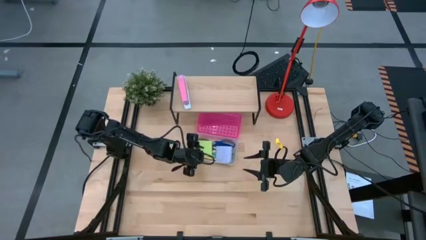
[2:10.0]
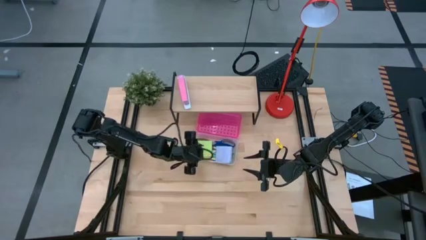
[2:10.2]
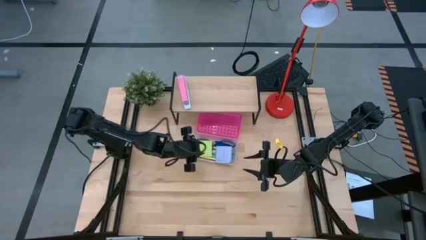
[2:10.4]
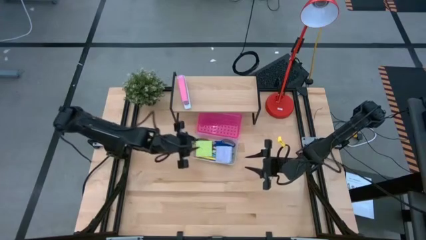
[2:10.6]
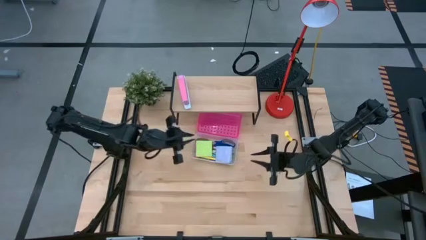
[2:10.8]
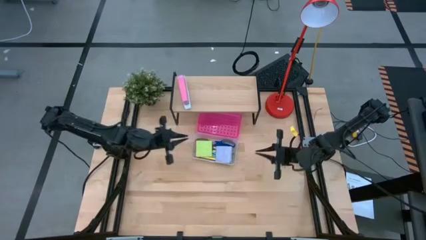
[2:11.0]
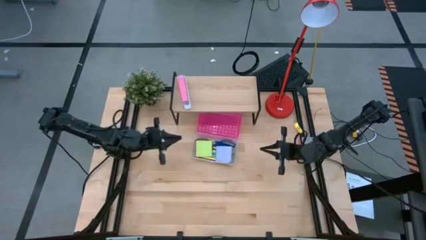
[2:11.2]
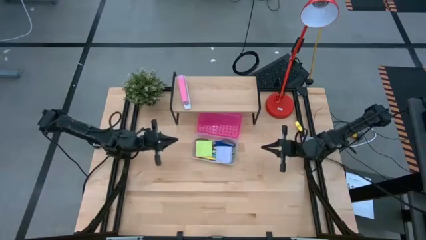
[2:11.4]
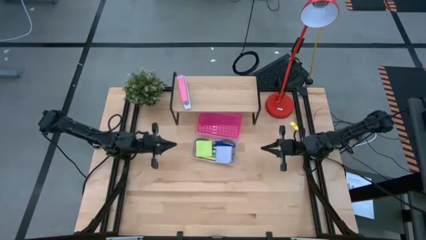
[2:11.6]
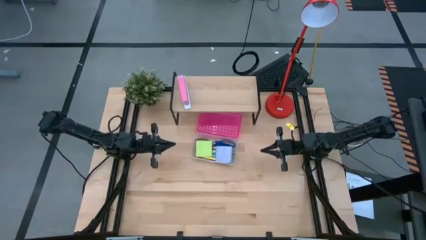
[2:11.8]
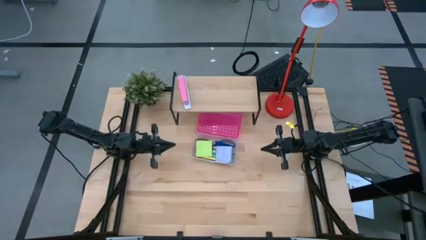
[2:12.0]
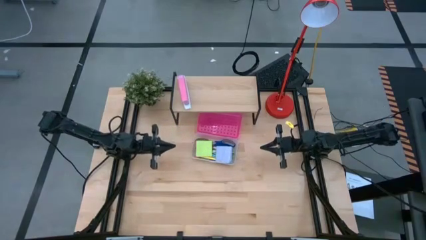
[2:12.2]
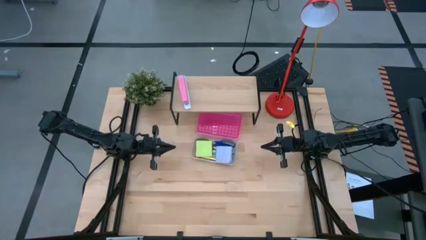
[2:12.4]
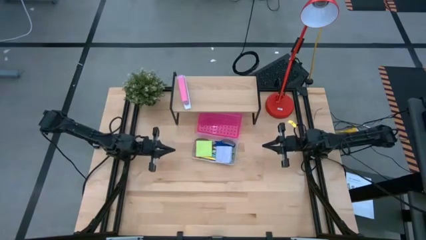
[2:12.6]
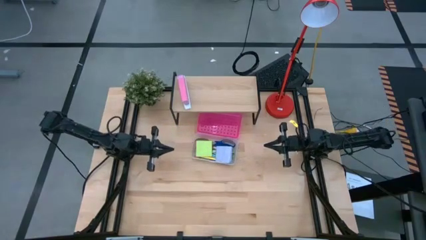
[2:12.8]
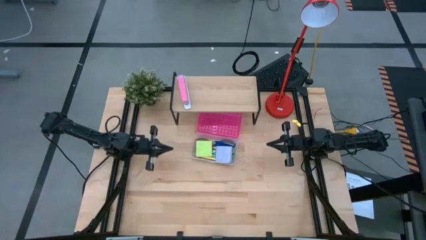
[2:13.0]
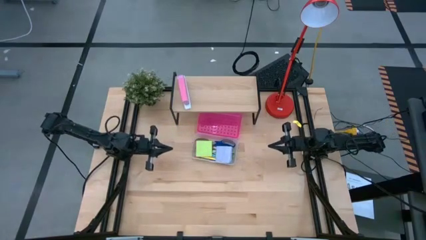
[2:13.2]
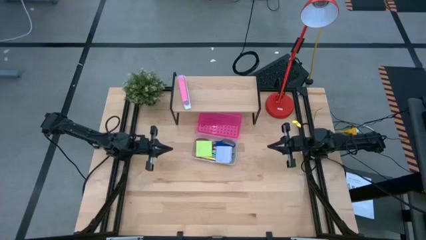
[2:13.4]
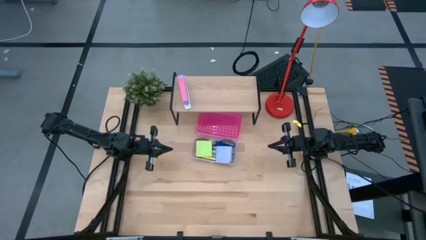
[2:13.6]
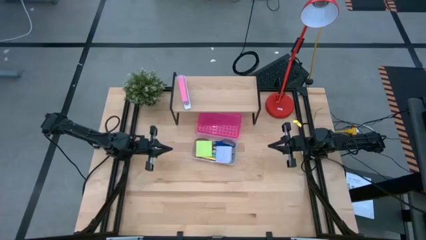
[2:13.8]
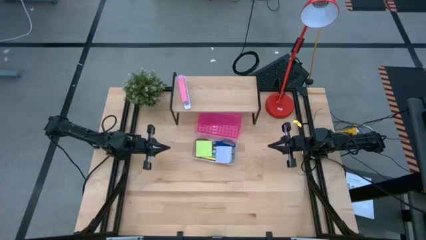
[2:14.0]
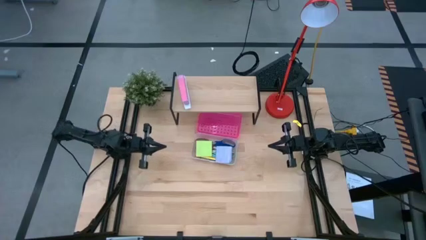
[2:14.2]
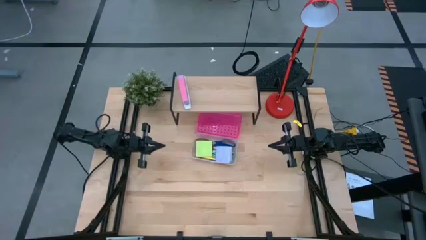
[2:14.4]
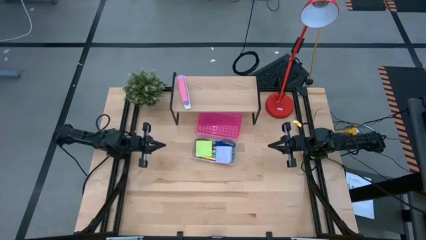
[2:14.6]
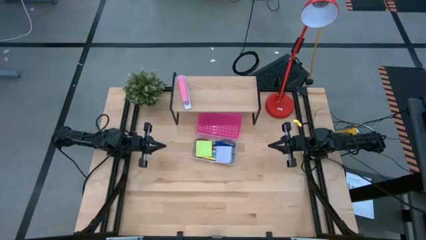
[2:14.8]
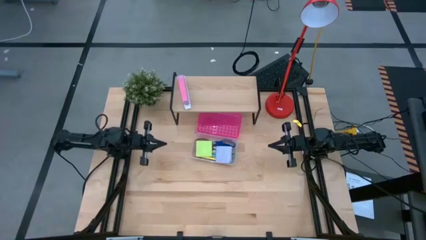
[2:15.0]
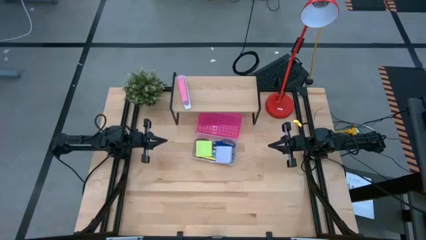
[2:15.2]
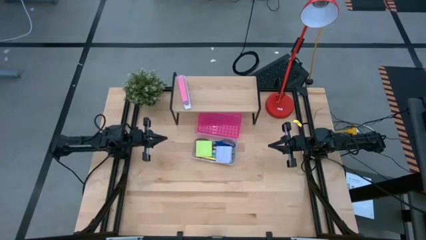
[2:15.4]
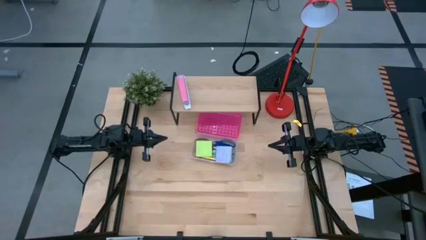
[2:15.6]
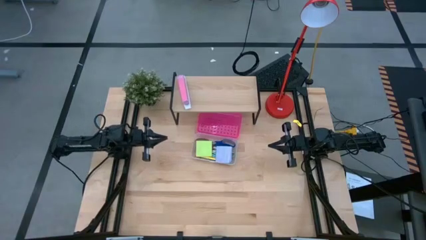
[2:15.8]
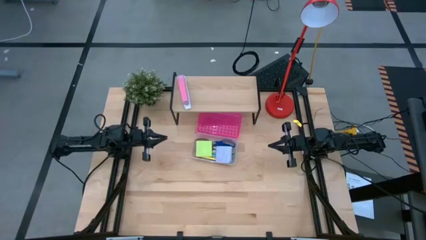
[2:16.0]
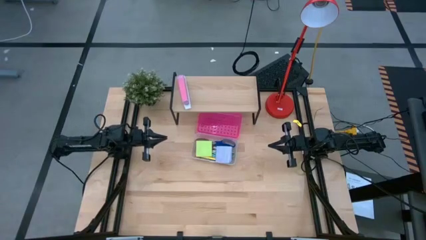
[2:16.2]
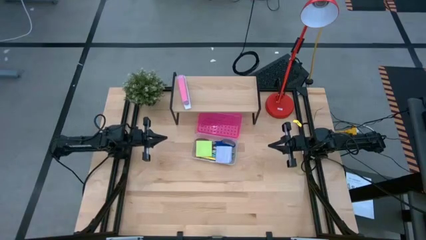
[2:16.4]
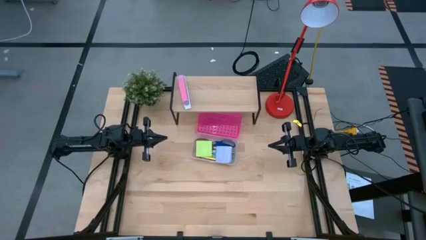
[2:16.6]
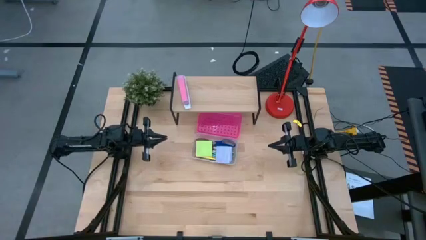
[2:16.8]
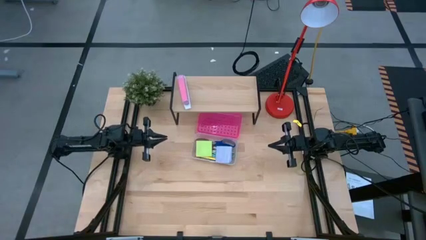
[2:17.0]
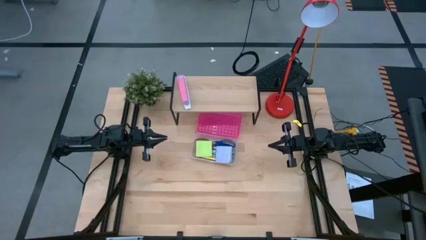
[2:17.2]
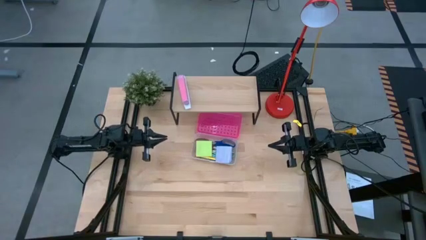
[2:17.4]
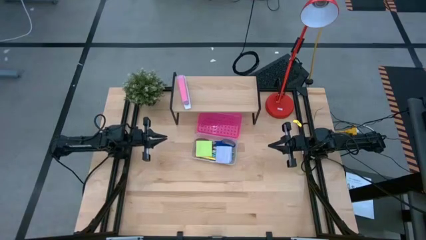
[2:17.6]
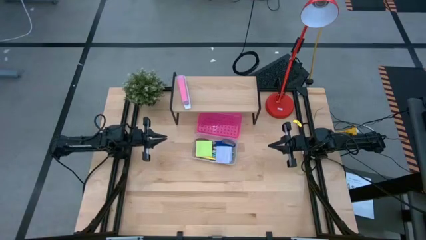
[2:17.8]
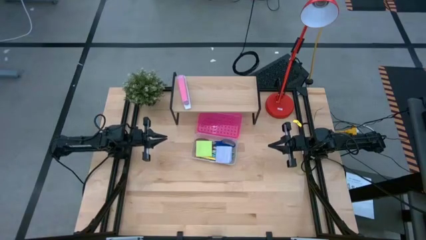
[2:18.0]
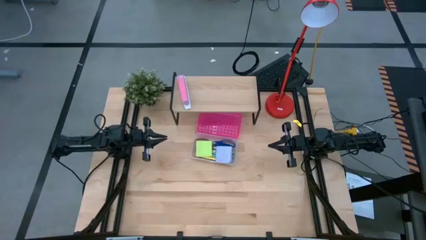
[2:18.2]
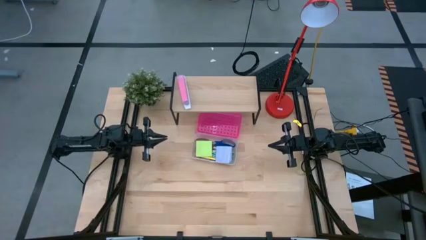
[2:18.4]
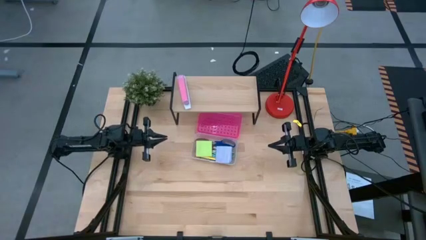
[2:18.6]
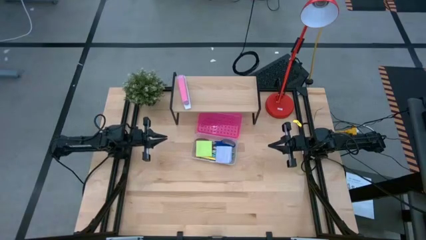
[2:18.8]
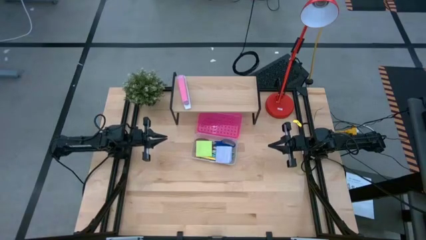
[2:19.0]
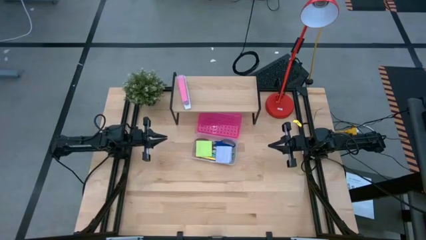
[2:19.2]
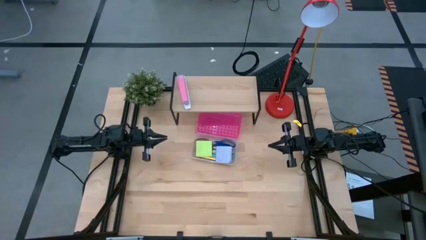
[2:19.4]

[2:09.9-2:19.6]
Task: Pack school essentials
Return to Home Position

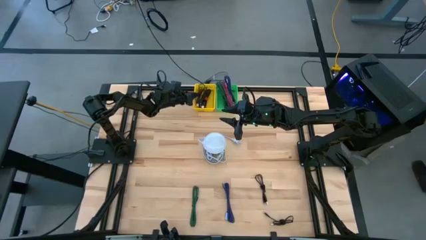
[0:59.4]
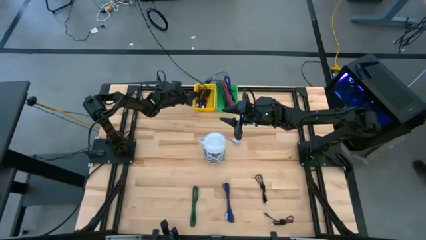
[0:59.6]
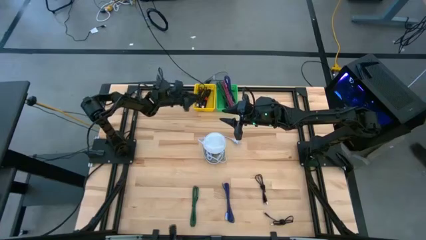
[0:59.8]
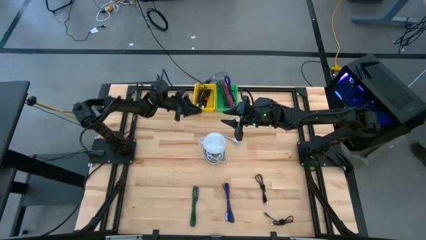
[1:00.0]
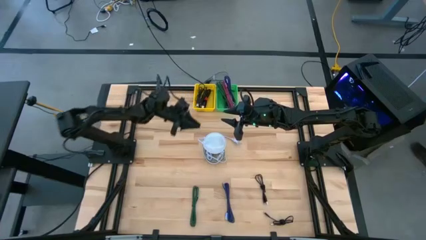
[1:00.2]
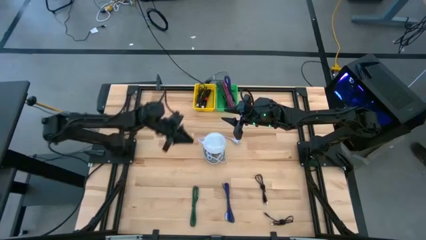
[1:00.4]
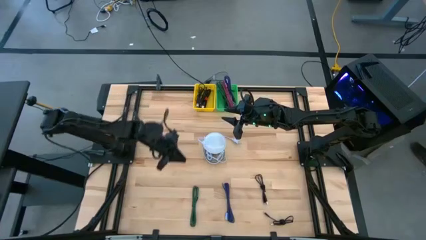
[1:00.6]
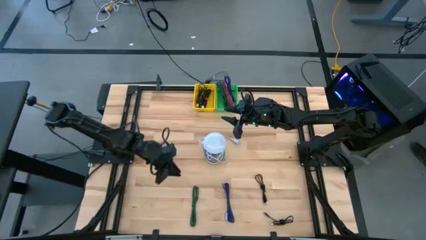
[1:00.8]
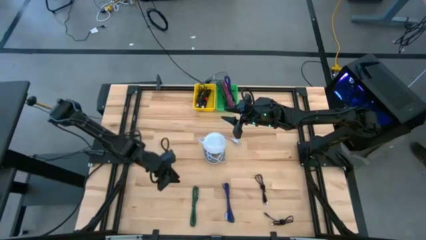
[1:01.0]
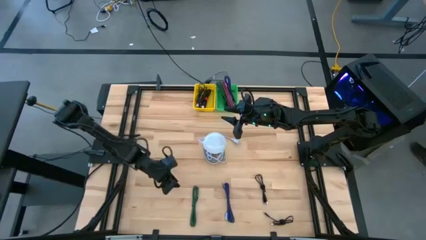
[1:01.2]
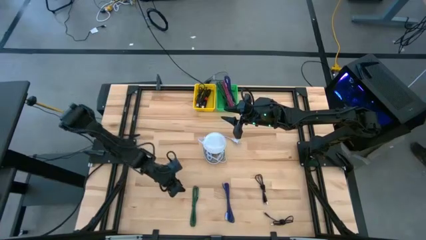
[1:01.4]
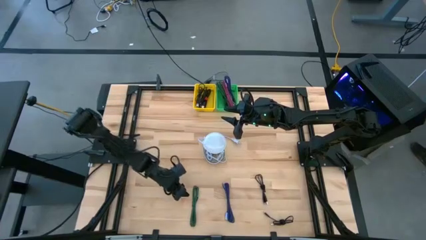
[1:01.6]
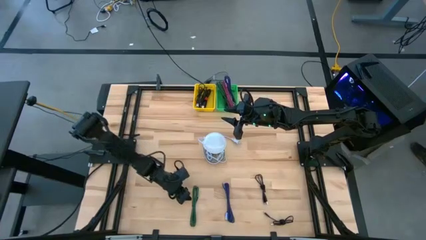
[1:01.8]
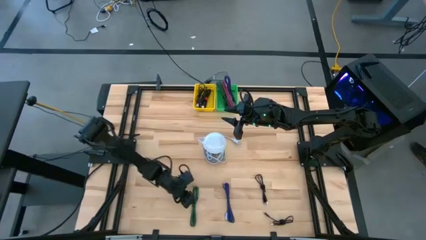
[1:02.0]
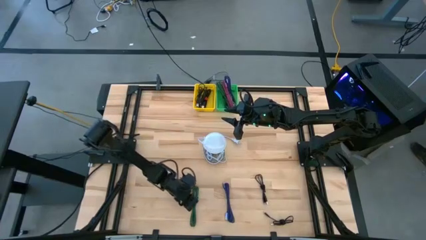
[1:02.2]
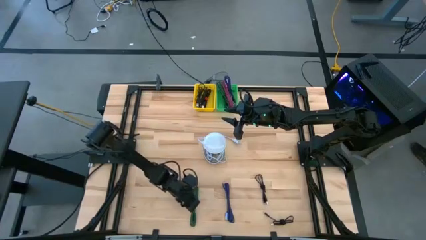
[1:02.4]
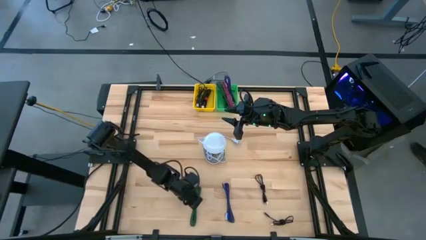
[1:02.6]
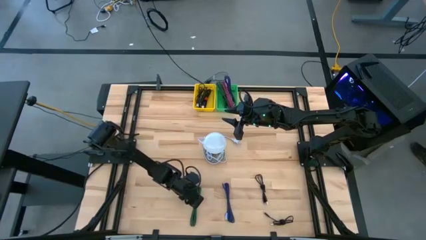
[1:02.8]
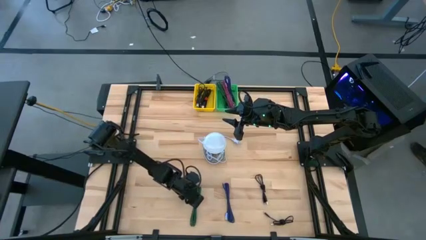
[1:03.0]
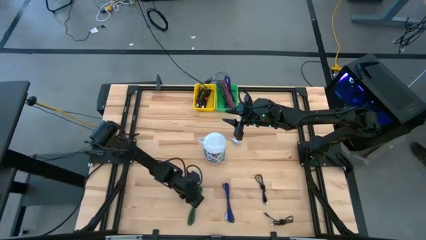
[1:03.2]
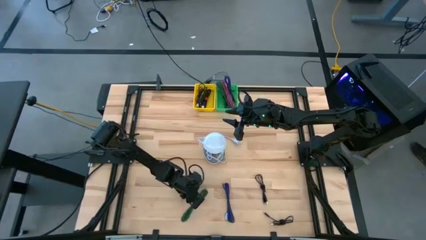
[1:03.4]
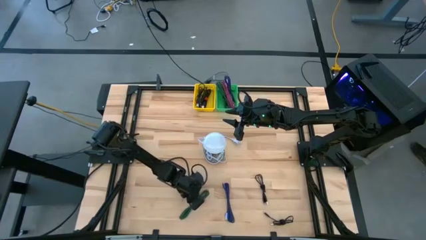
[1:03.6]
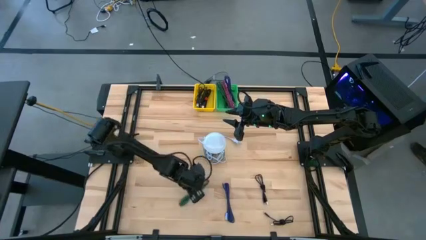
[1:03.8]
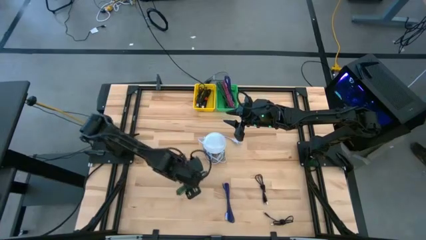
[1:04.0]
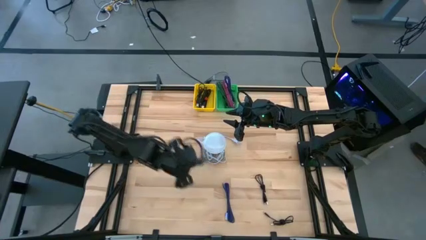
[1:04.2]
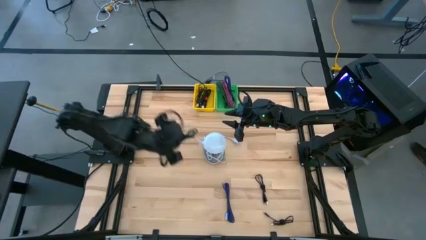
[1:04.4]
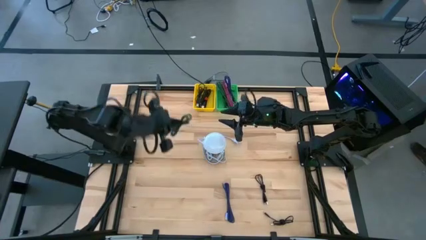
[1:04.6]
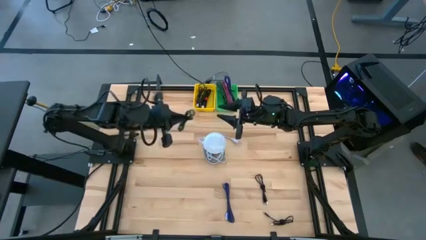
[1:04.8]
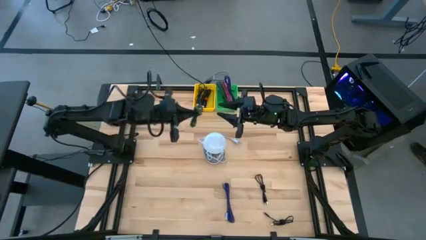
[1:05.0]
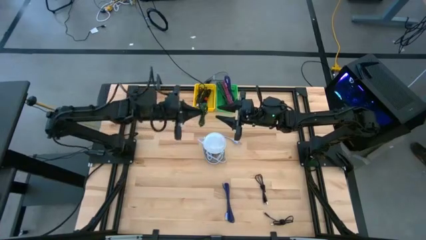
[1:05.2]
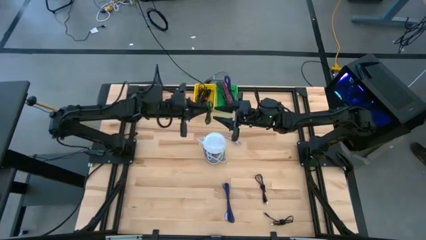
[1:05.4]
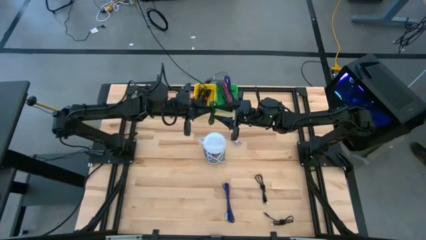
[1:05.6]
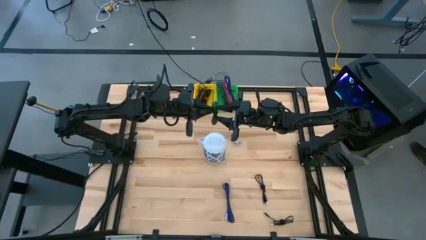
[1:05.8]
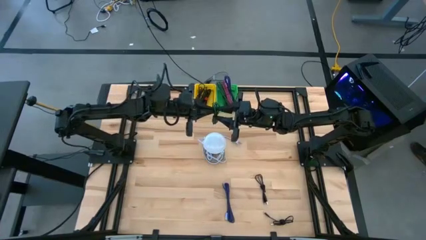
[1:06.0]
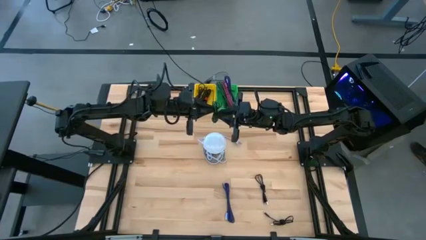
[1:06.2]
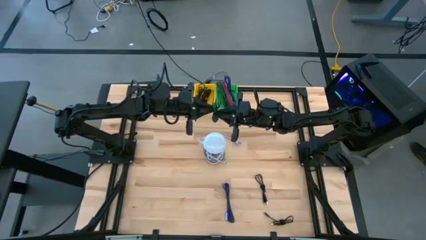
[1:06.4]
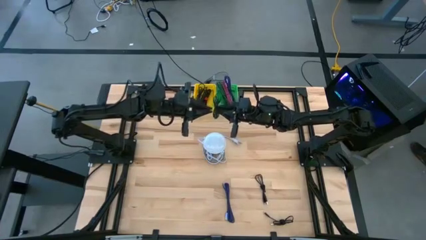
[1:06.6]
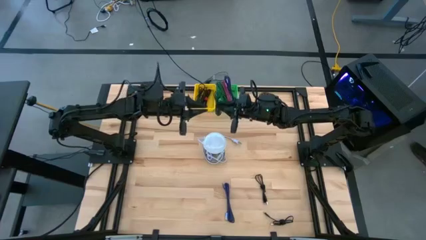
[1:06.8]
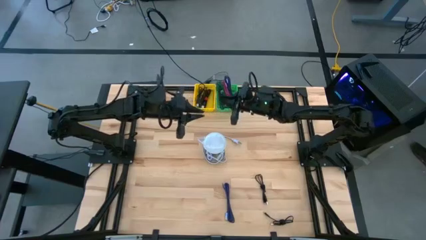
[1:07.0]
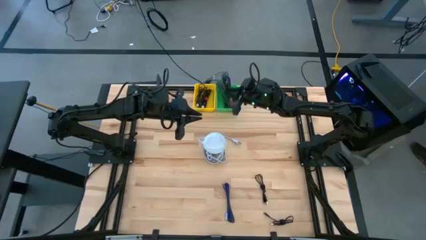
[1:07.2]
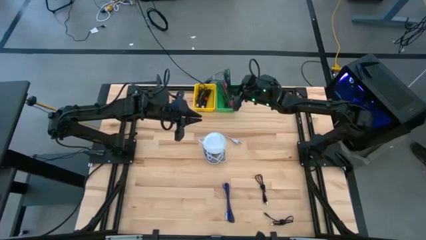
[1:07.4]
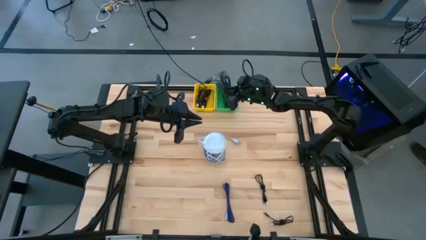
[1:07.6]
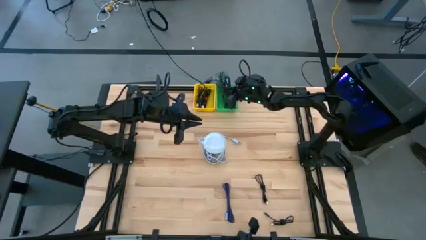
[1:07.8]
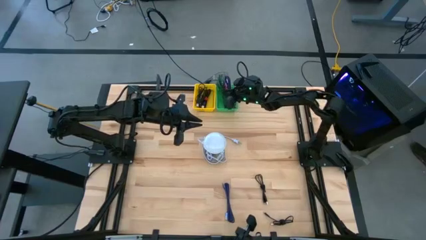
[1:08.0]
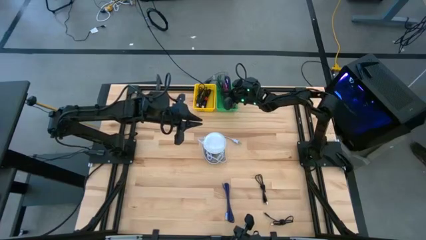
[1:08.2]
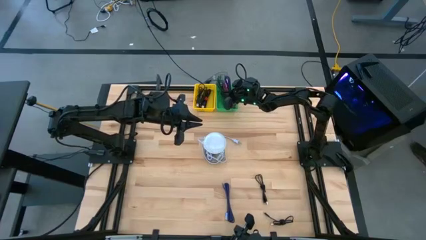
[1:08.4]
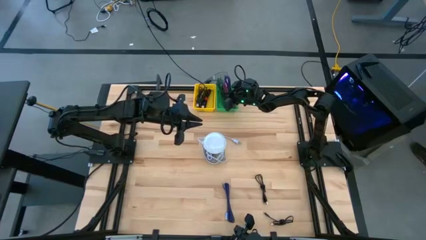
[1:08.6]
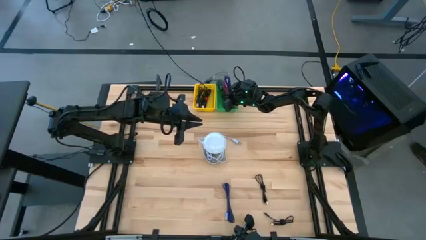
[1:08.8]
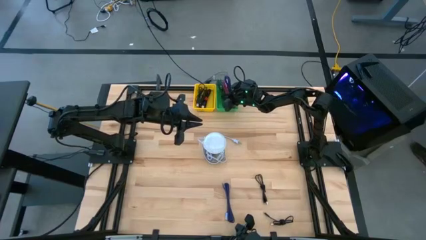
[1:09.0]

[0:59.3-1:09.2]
Task: Pick & Place USB Port
Put the green charger cable into the green bin
